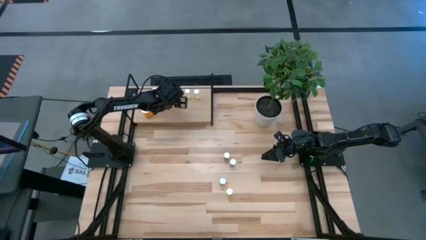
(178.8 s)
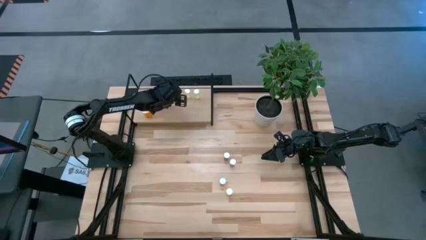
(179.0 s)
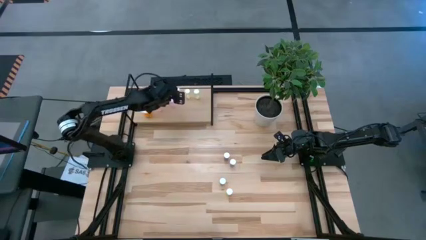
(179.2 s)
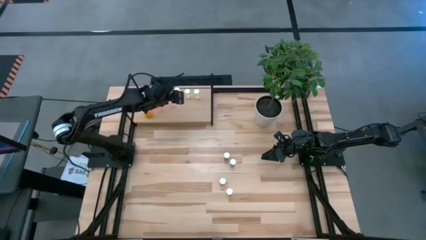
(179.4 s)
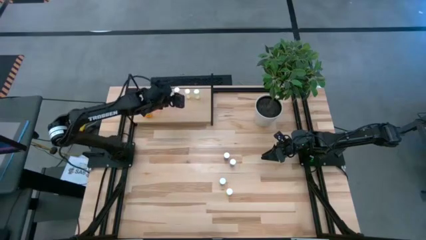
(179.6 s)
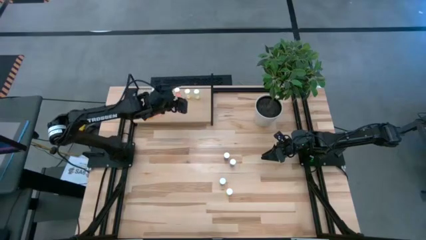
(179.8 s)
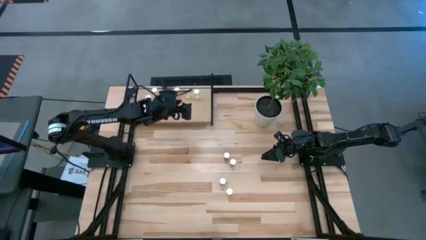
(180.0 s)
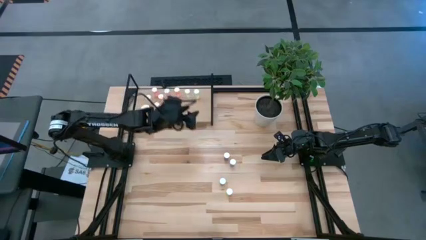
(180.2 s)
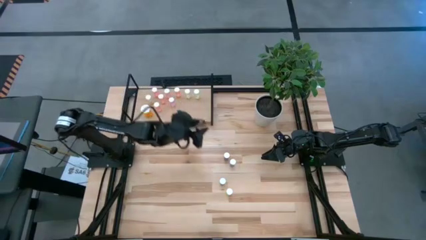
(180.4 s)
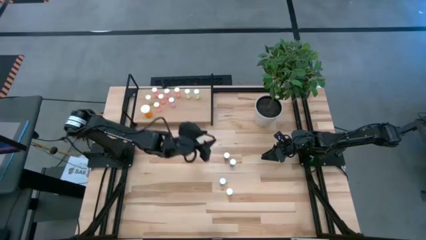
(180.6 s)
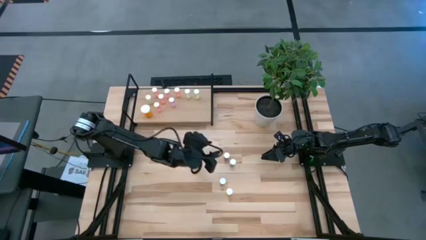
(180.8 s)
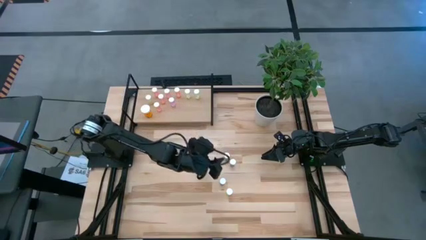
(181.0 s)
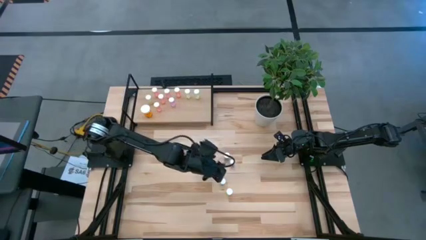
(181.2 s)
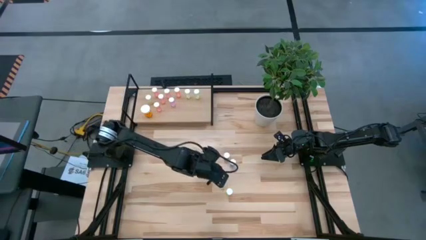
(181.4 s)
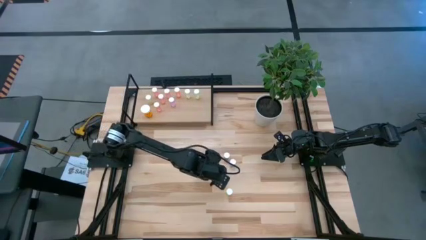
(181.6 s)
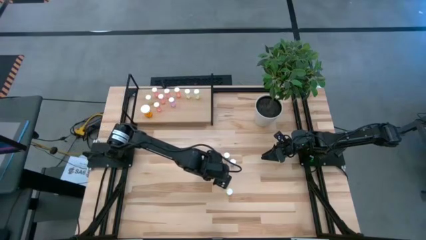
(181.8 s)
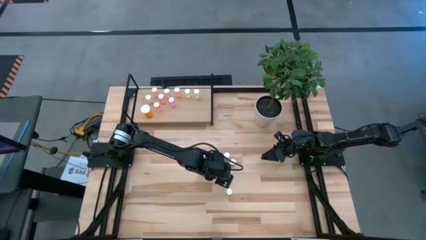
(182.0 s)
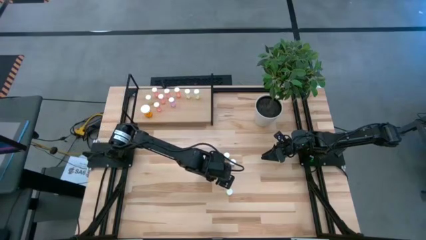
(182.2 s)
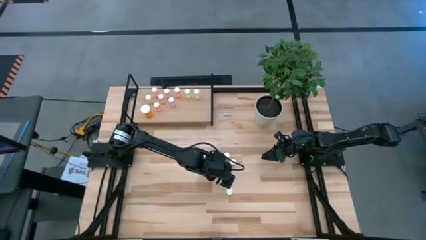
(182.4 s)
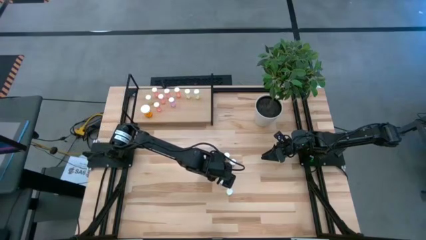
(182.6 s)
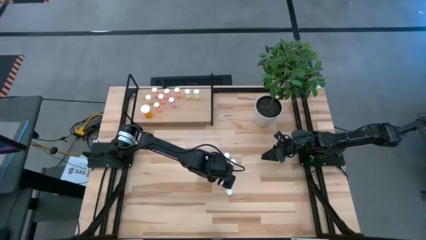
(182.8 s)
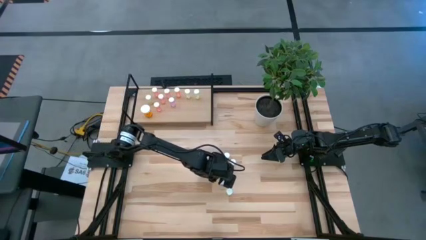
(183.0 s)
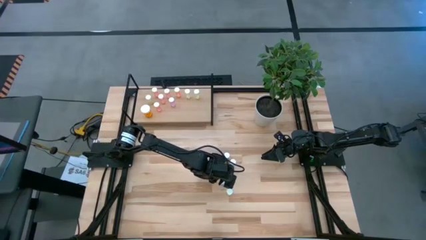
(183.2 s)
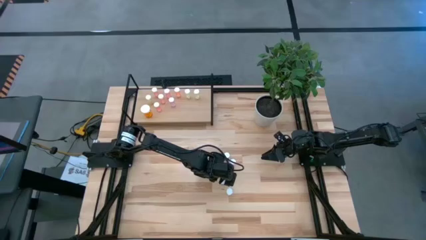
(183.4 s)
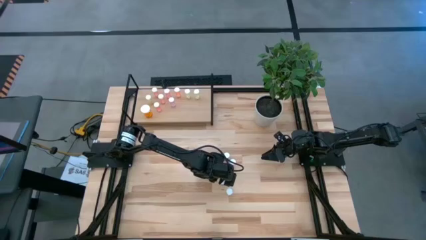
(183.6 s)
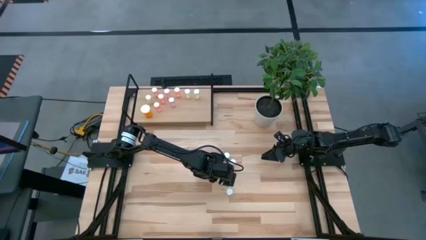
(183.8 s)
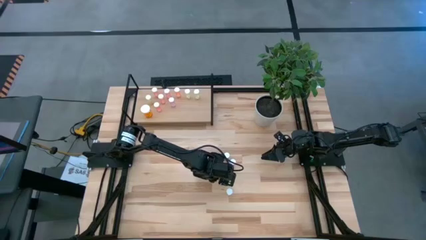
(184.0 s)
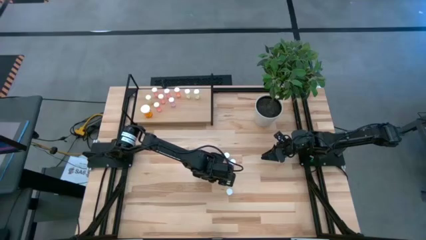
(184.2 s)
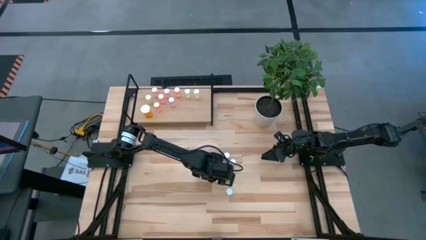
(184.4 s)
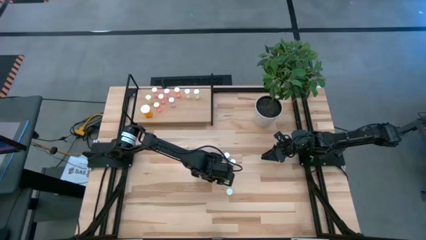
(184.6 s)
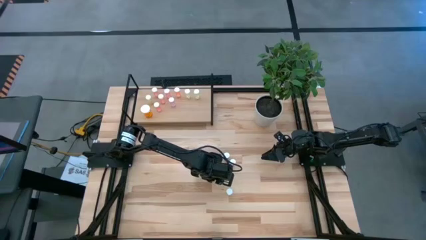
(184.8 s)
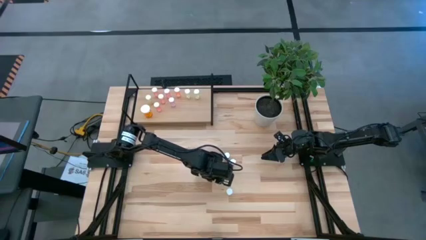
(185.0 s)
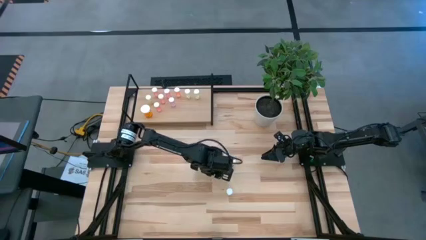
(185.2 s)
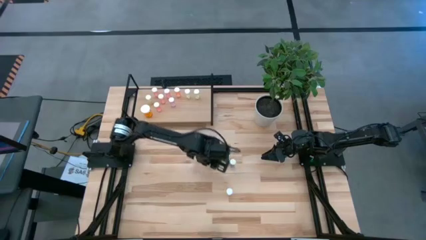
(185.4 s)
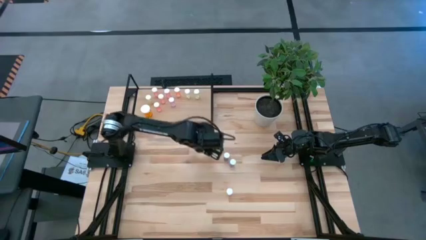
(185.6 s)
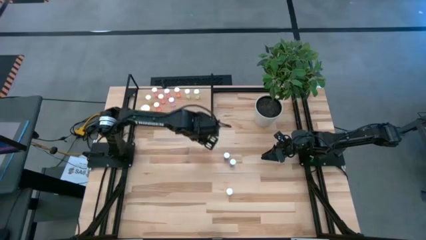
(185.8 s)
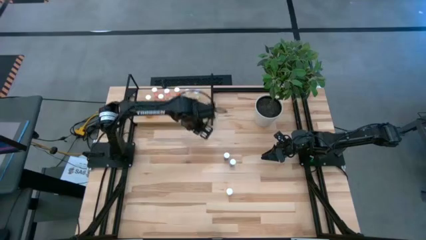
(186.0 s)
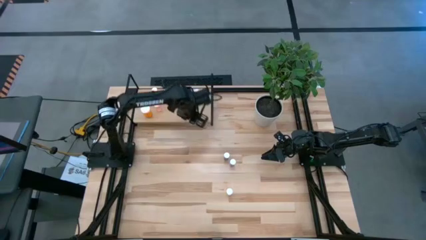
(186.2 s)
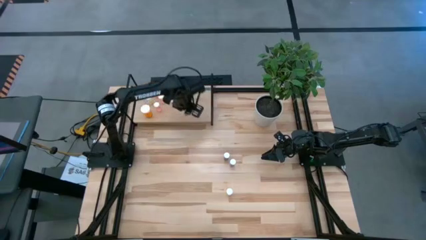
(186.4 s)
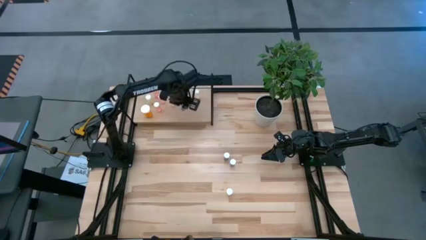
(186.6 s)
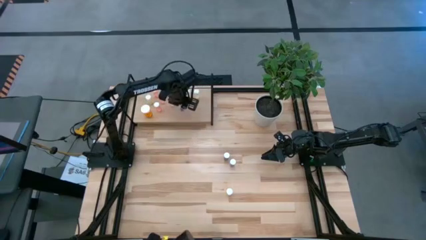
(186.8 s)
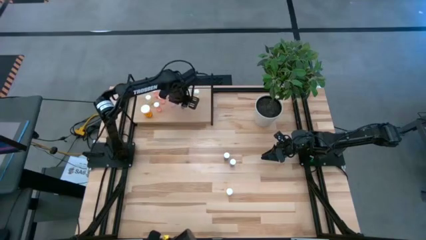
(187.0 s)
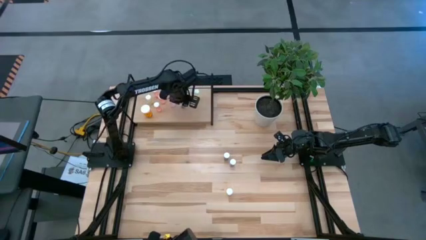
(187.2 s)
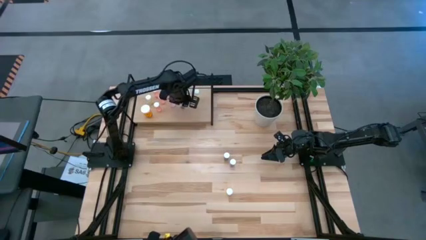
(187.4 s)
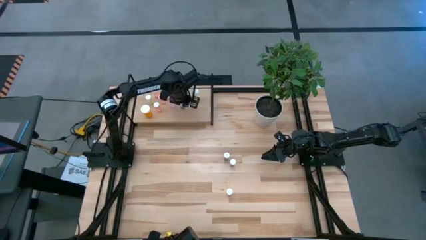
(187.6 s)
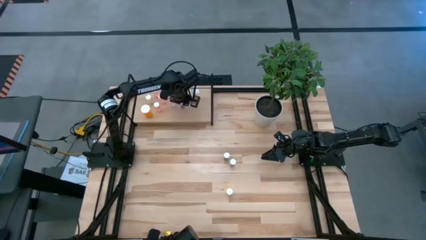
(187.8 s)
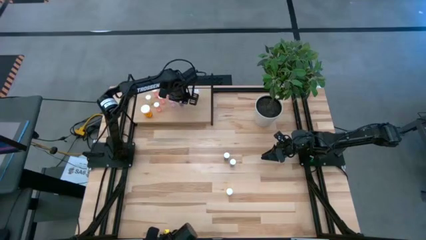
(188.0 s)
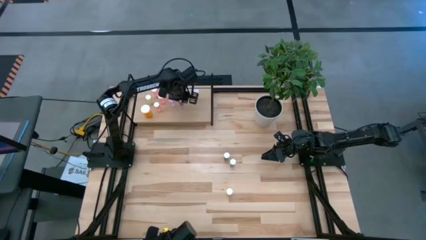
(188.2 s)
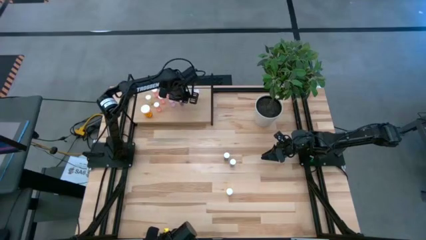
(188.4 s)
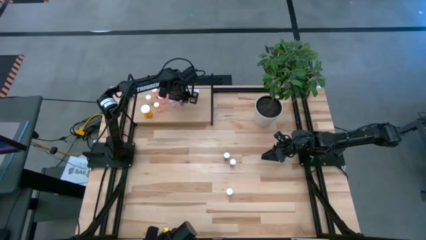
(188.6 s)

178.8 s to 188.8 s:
Task: Pick and place medicine bottles onto shelf by color
Put the blue pill bottle on the shelf
